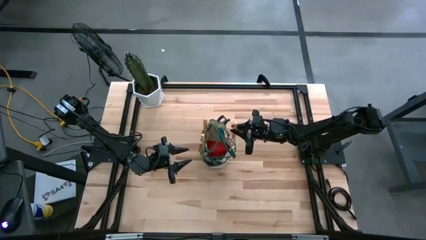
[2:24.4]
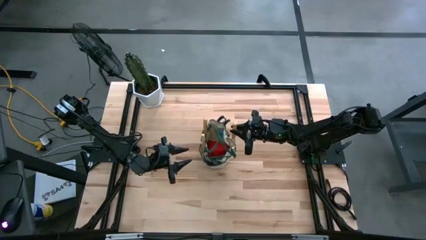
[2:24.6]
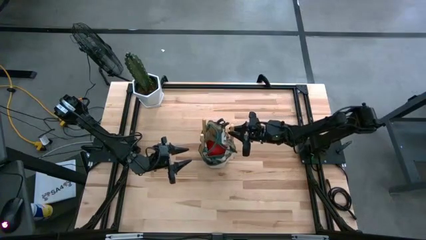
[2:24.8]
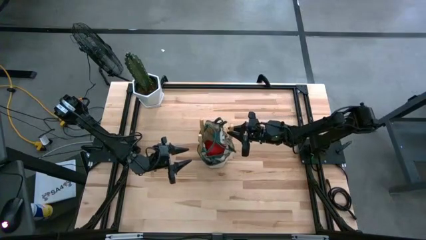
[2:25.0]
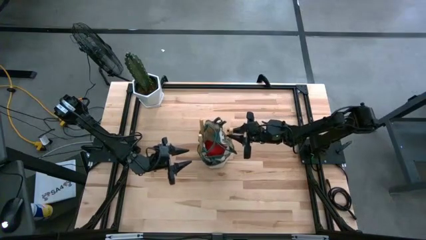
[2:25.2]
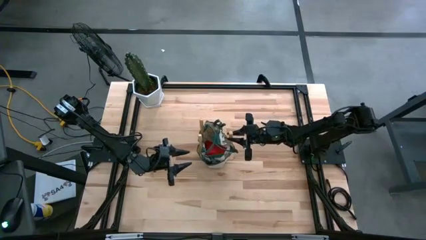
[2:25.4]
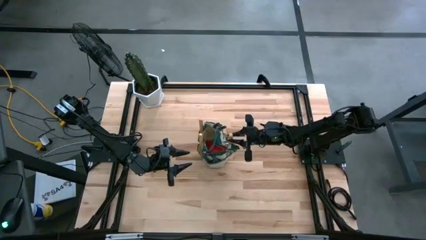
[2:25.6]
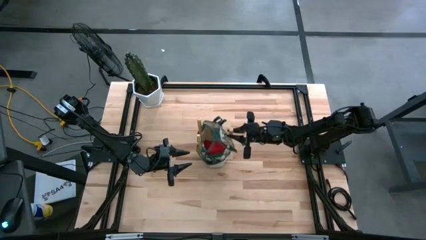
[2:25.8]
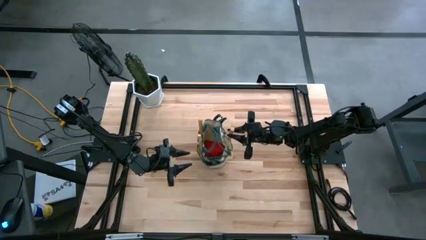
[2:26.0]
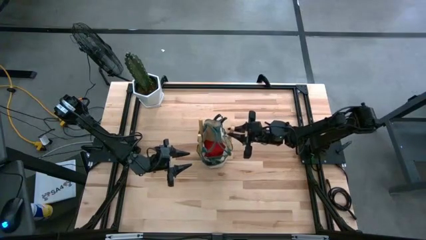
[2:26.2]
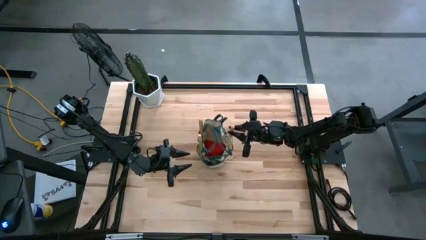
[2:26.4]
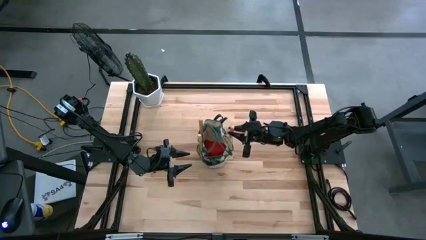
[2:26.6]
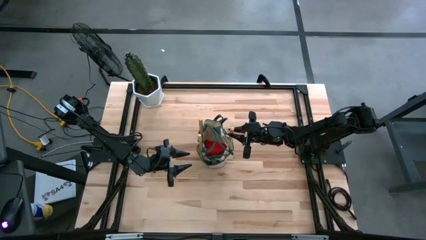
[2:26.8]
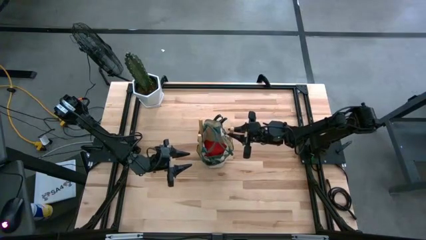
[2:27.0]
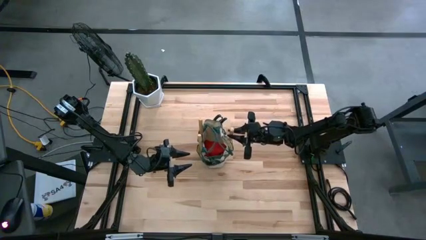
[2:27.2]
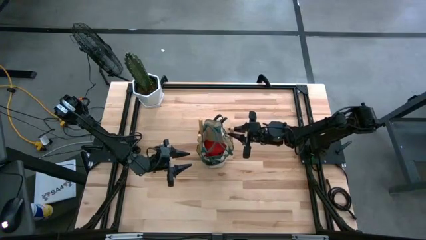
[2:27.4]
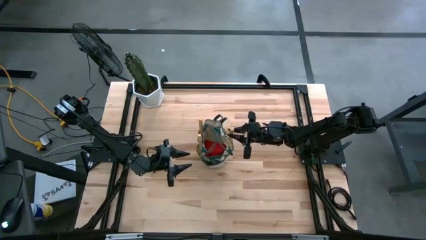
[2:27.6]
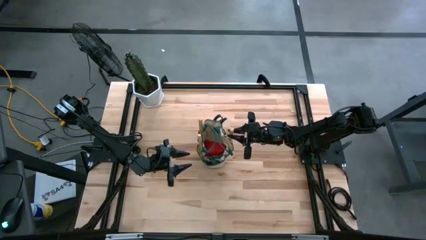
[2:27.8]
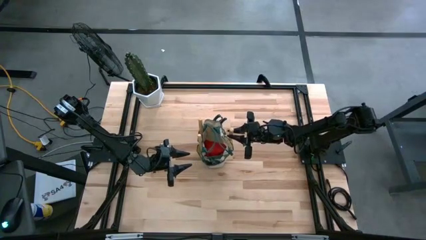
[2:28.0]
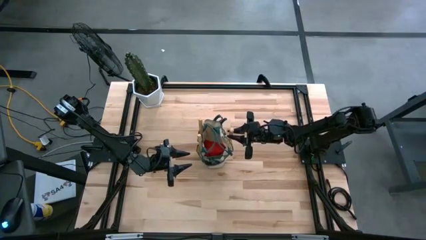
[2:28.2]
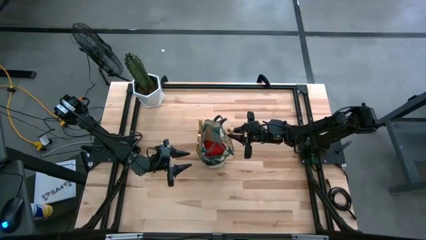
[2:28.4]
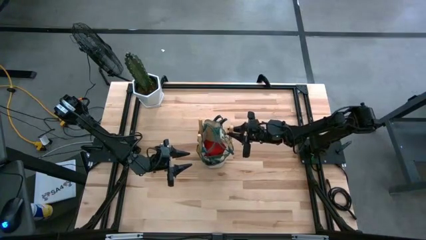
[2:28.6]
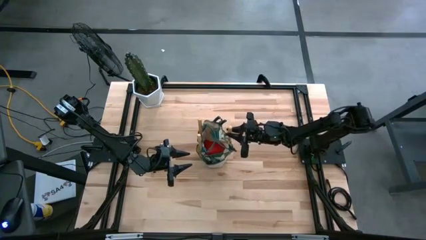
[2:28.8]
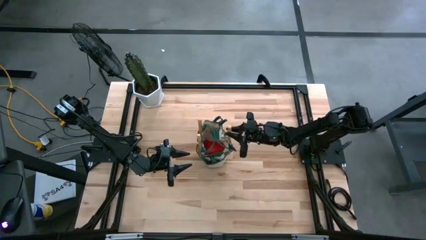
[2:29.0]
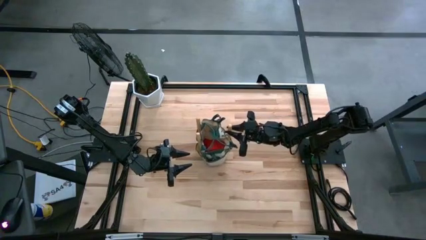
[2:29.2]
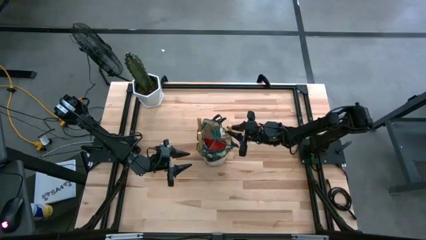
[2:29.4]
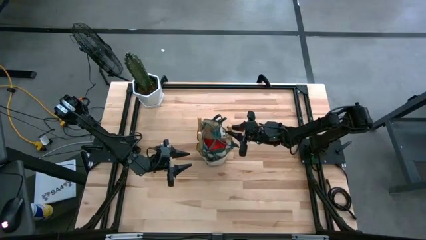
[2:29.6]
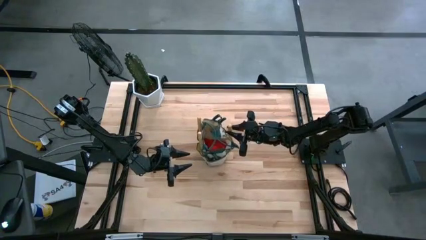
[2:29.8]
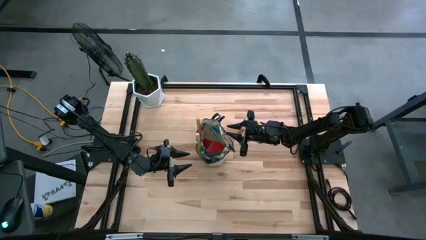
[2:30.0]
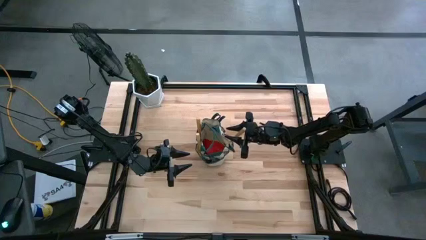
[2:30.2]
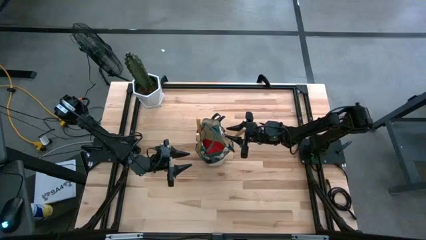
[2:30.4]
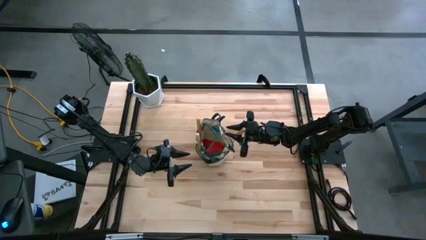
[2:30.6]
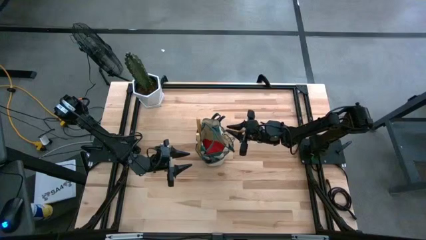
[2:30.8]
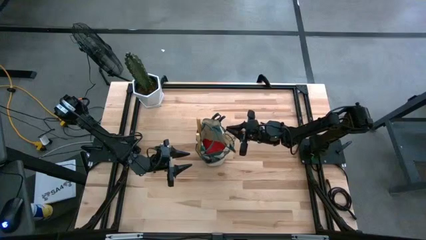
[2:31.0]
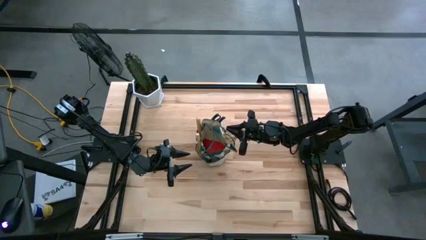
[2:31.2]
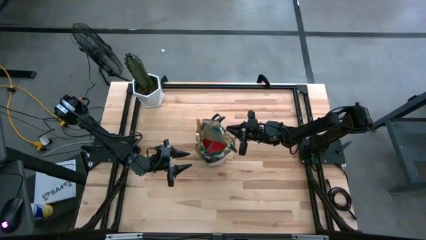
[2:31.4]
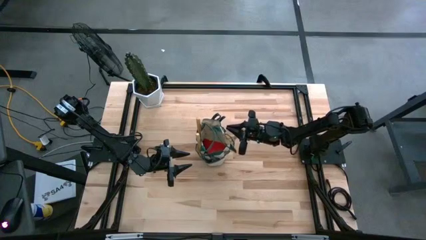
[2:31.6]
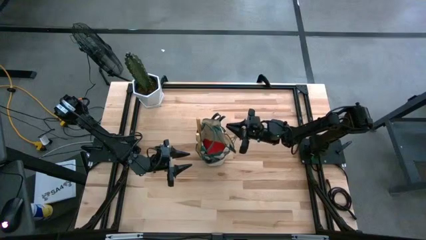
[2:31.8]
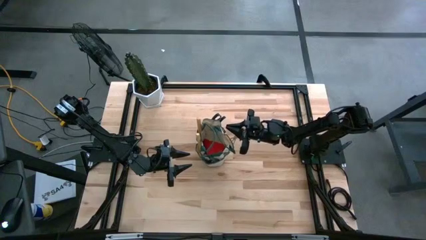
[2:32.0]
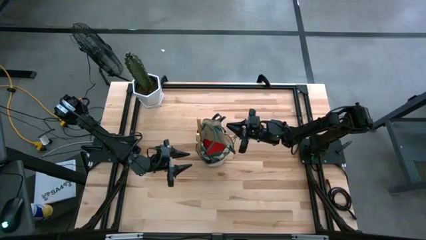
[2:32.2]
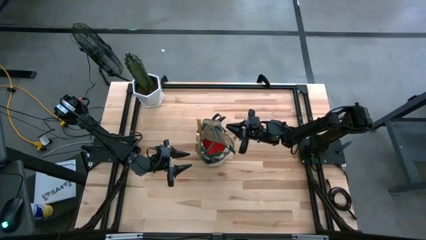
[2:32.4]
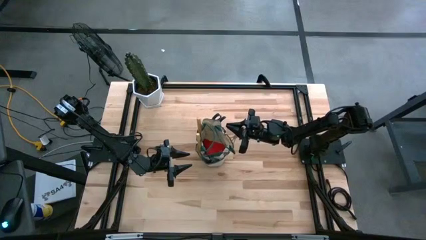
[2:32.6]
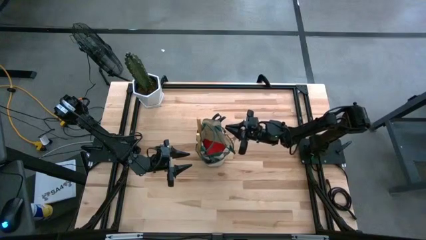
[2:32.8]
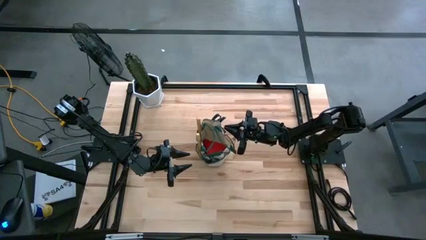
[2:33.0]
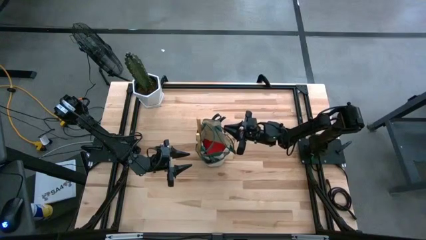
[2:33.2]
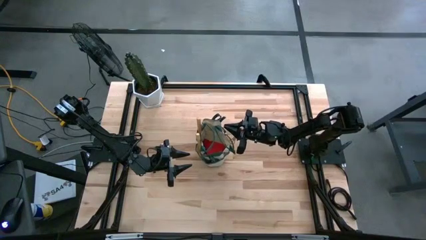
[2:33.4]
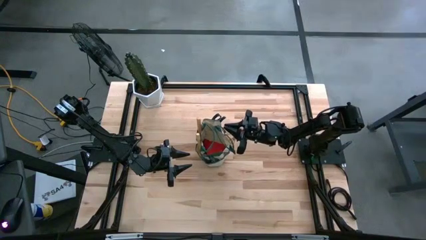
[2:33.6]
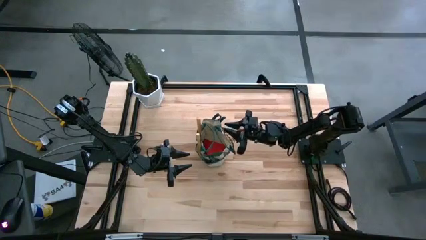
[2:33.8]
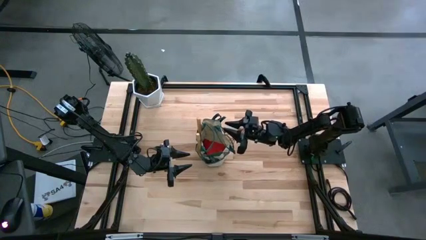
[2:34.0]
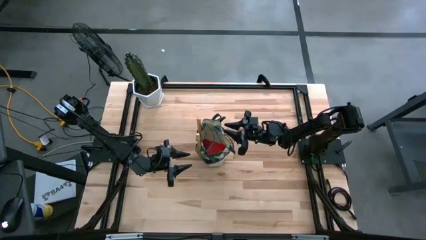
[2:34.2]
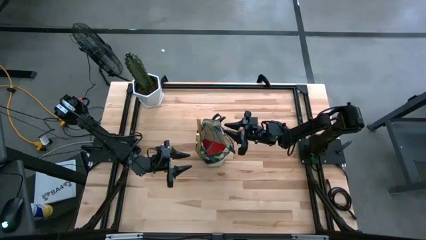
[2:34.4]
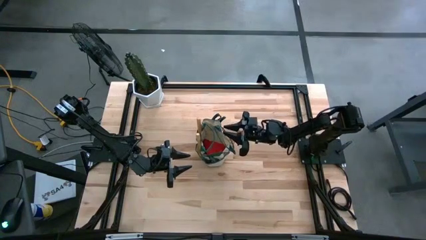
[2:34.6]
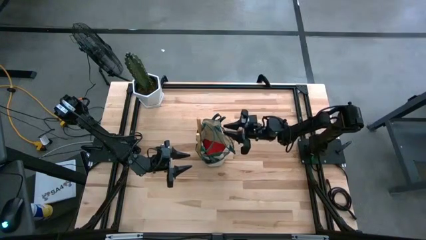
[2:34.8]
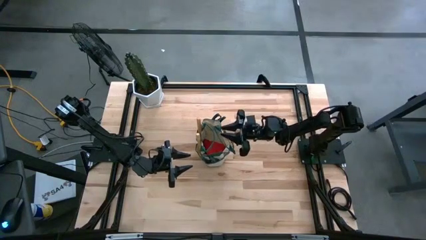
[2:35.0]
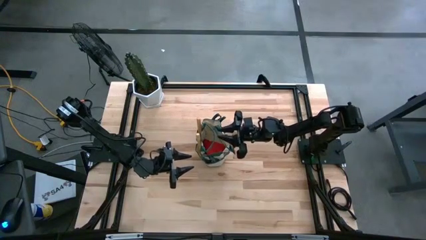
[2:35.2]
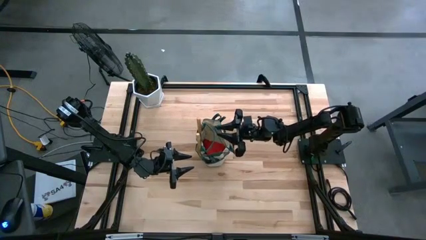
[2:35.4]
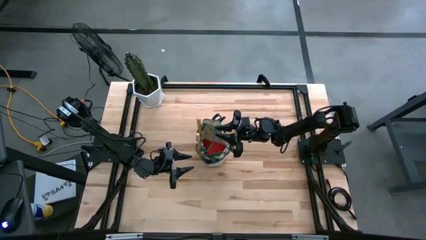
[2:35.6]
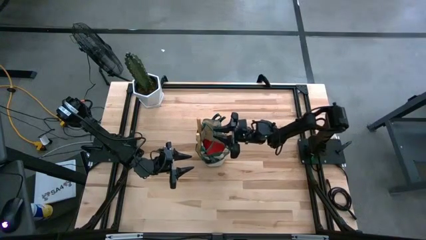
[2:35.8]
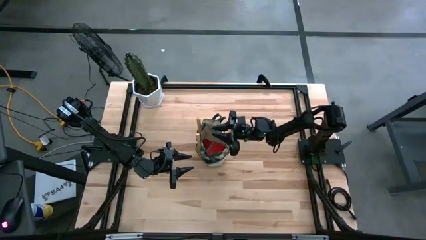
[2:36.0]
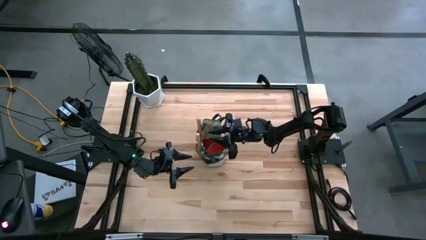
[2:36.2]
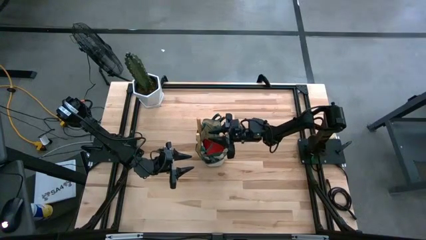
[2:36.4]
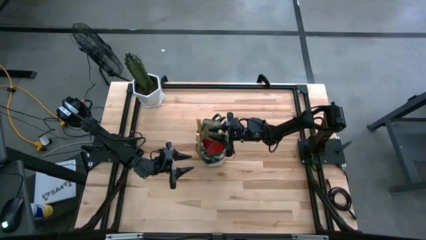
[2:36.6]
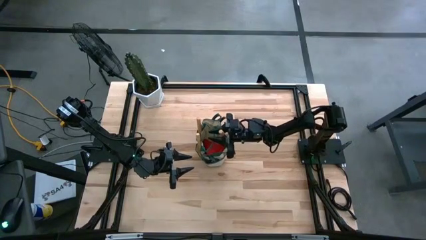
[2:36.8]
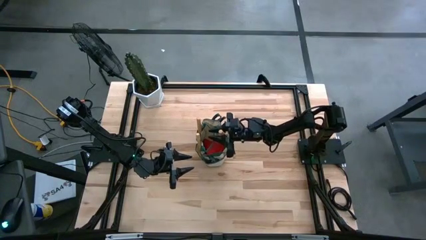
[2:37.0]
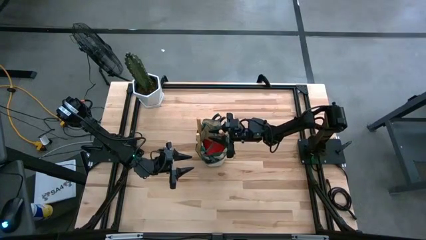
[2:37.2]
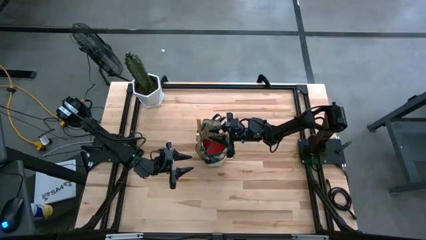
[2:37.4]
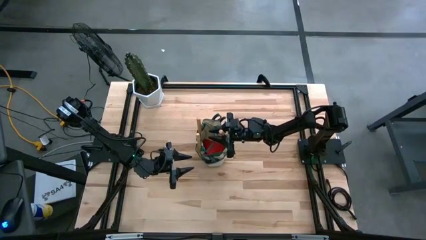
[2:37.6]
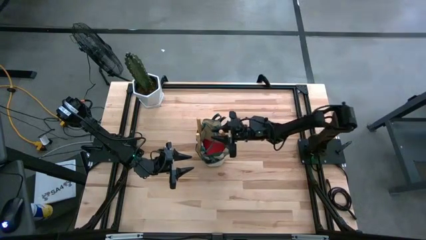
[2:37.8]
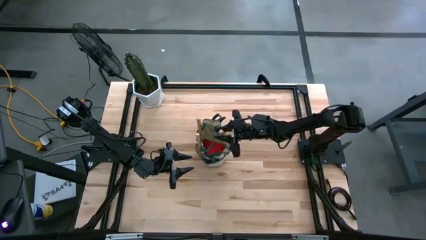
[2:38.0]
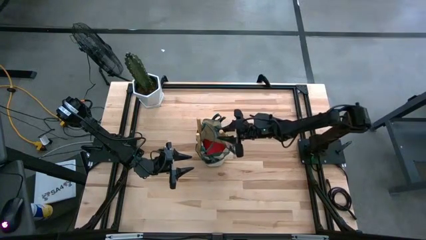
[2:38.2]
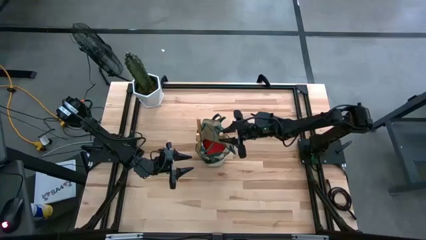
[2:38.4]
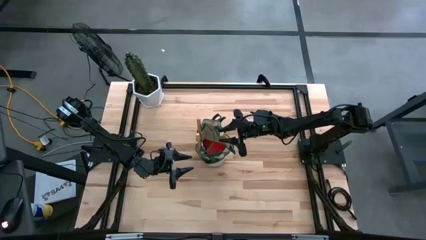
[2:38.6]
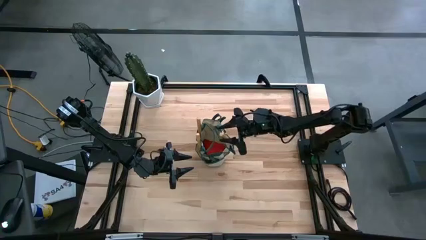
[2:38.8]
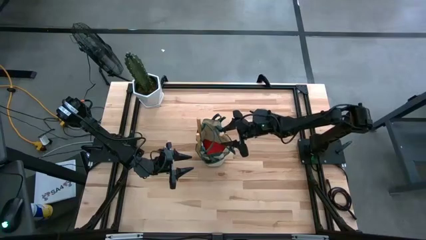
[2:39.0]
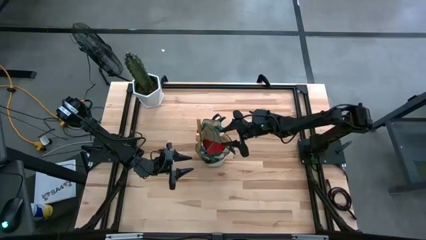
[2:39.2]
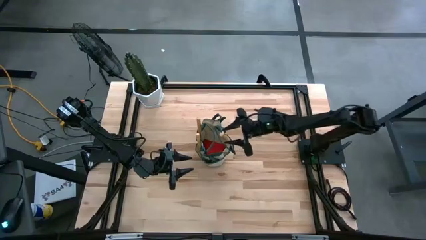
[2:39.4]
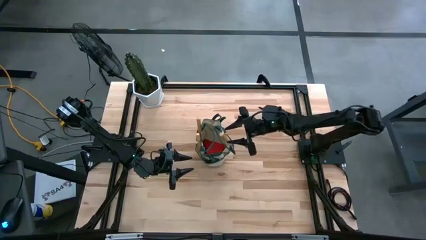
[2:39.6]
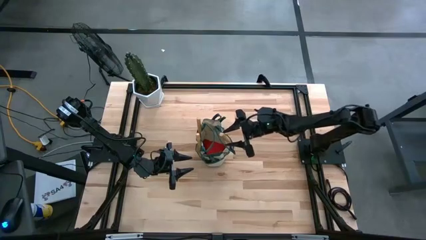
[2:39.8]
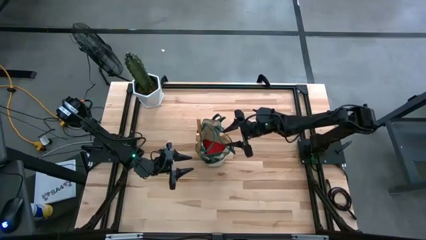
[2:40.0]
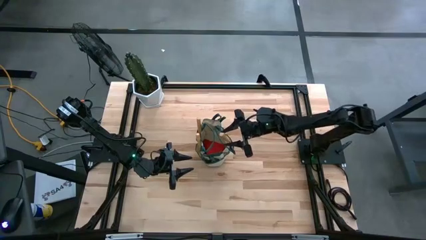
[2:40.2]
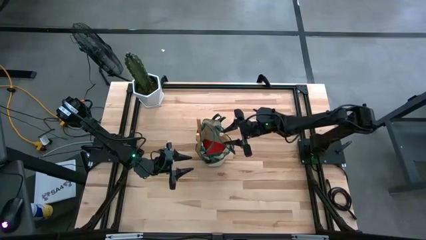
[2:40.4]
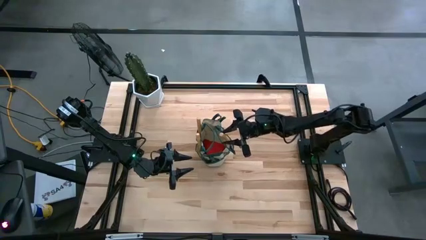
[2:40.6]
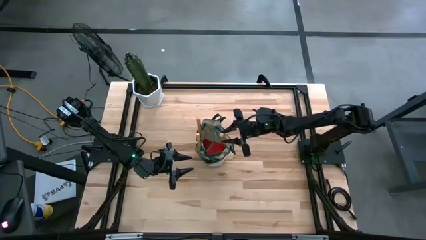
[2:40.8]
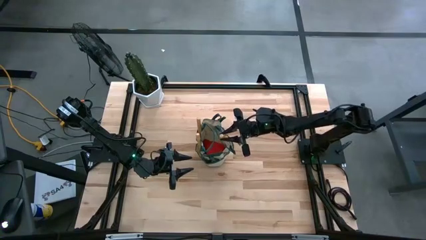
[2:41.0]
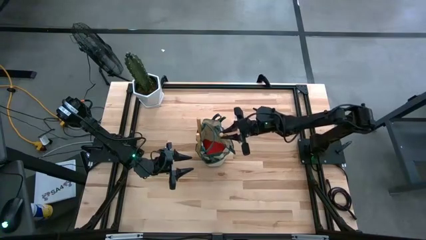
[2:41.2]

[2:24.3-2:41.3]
Task: Pick & Place Garden tools in Gardening bag
Put the brown hand rake into the gardening bag
